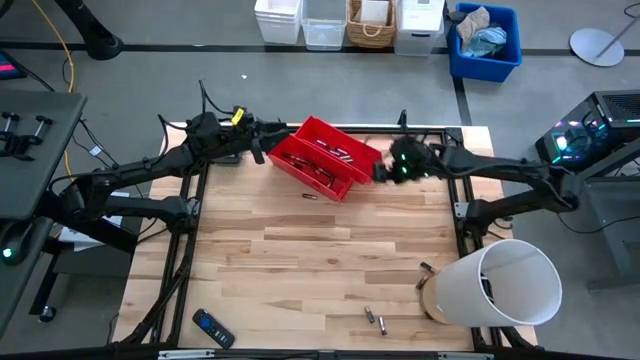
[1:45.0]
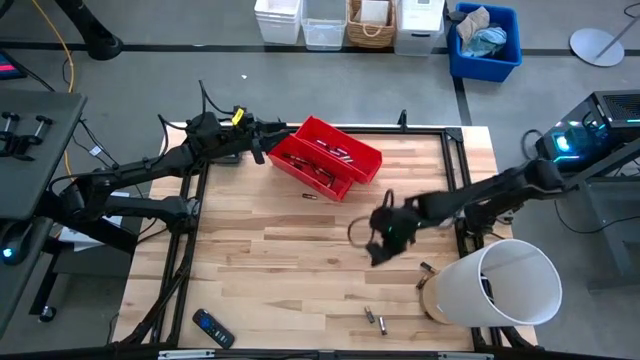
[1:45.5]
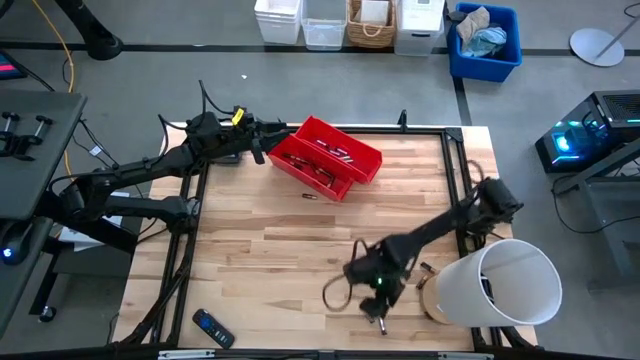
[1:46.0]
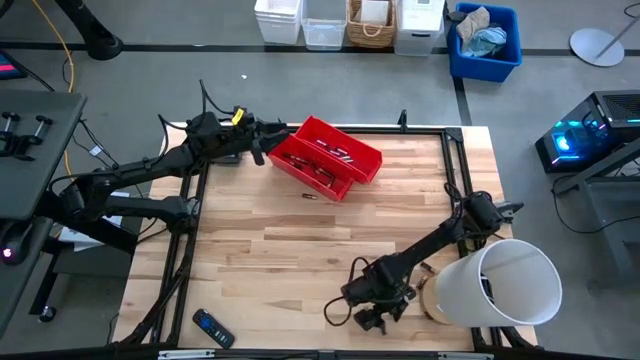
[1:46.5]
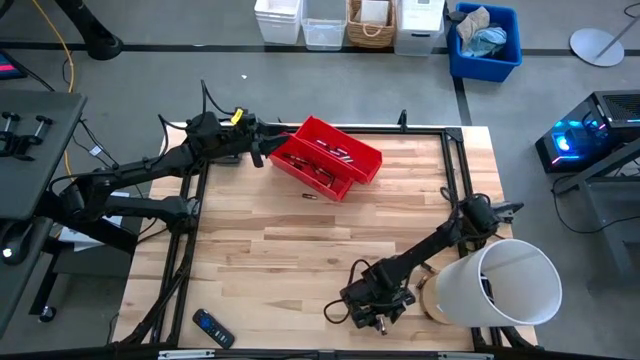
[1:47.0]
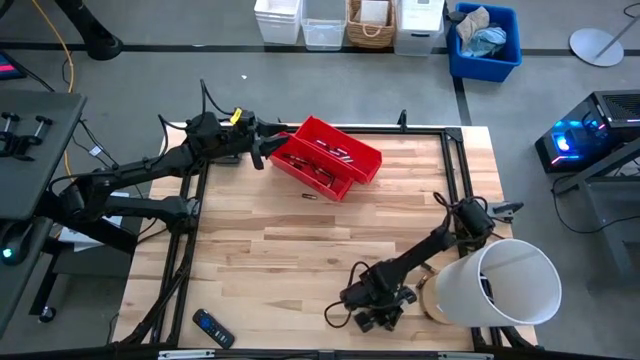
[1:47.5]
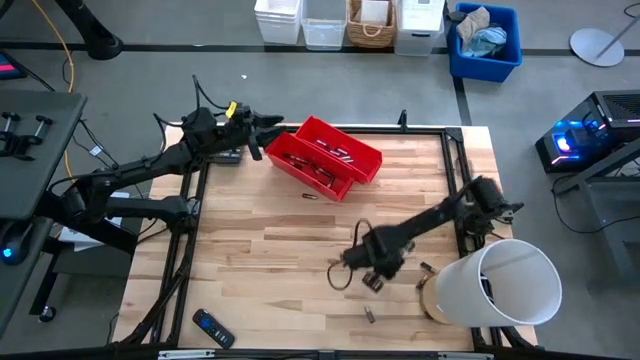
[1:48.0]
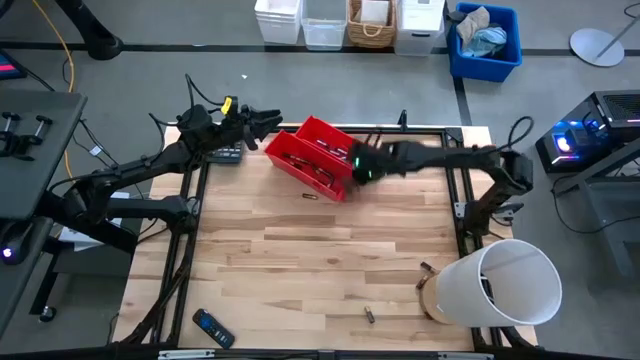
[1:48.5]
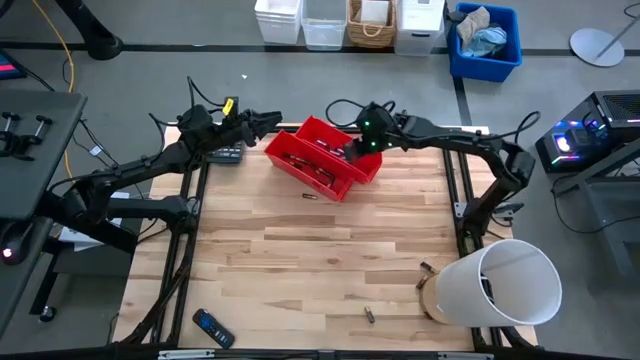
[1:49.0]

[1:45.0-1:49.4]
Task: Sort batteries
Put the silver battery into the top red bin

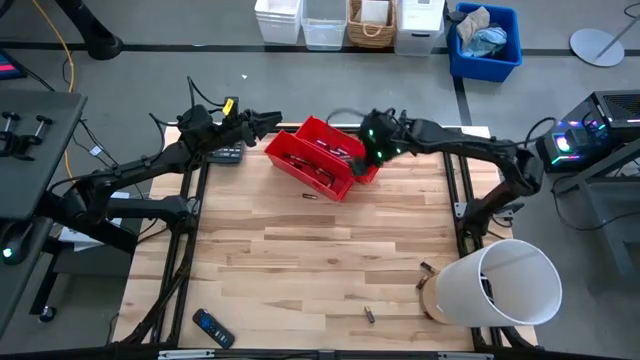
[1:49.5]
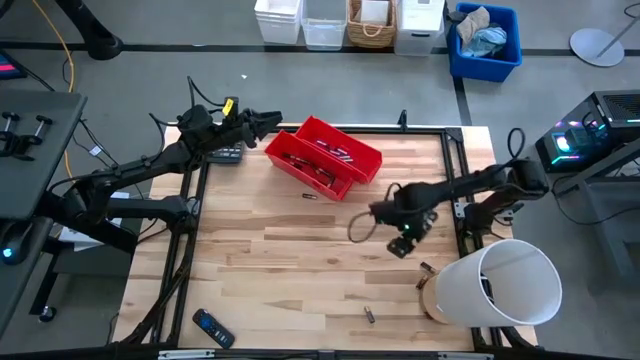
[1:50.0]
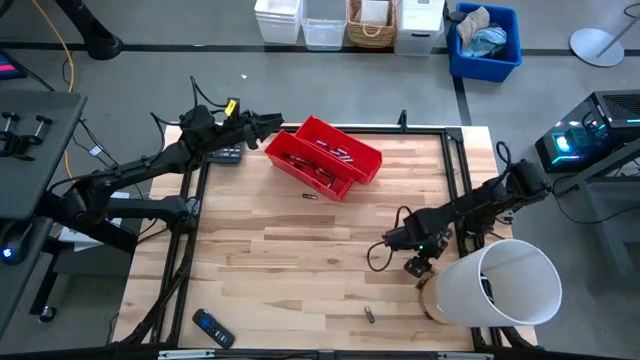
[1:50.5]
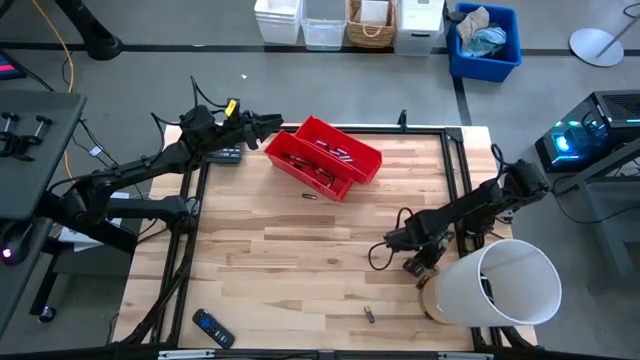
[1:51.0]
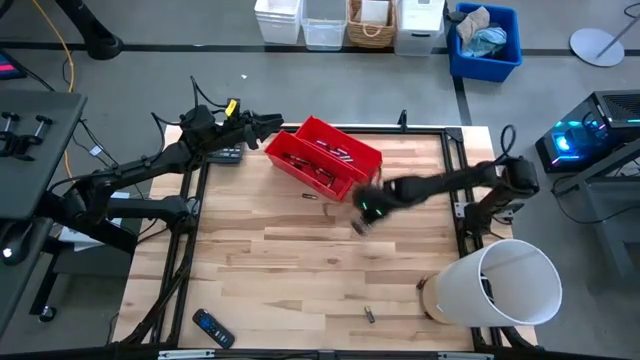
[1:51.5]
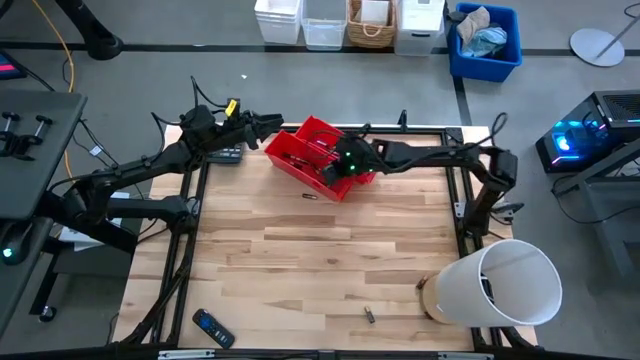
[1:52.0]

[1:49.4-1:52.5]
Put the black battery into the bottom red bin

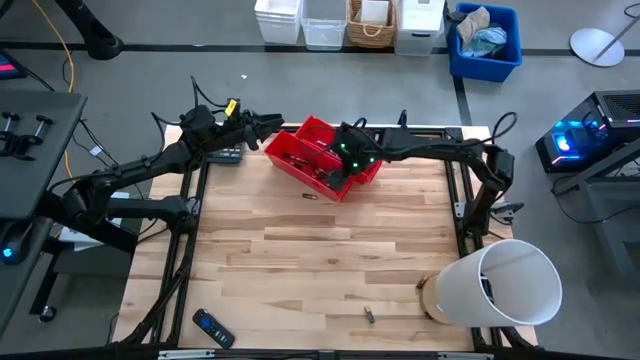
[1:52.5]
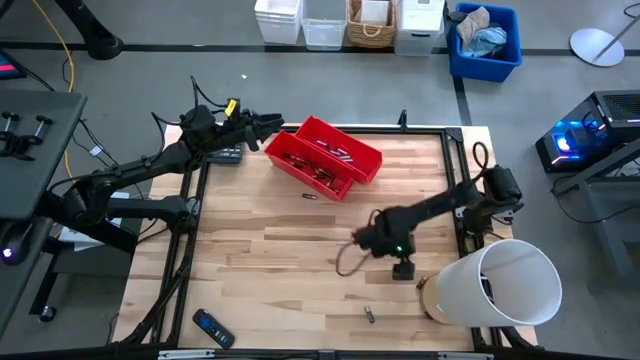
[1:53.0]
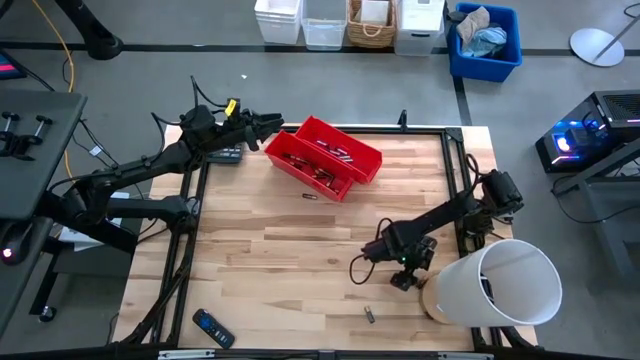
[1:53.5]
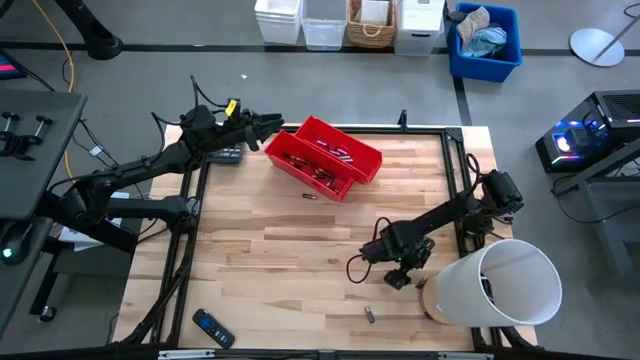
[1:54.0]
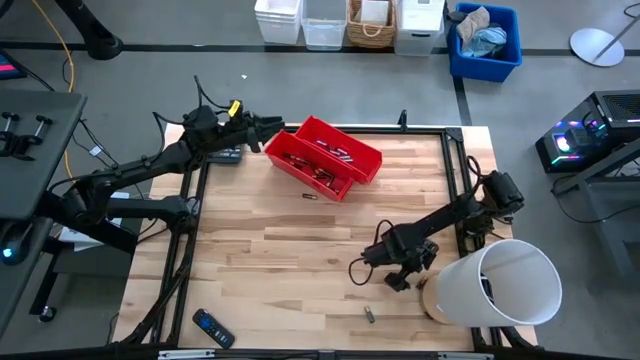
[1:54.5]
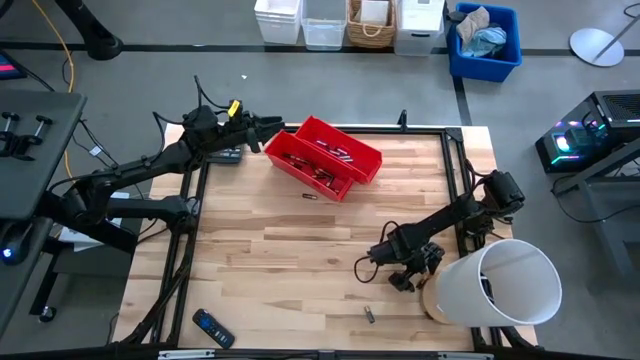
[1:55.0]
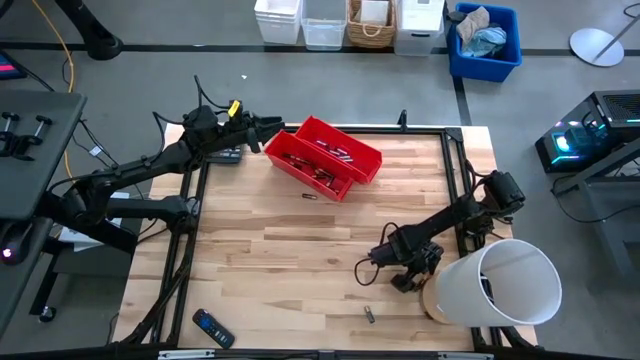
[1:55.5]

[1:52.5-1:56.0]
Put the black battery into the bottom red bin

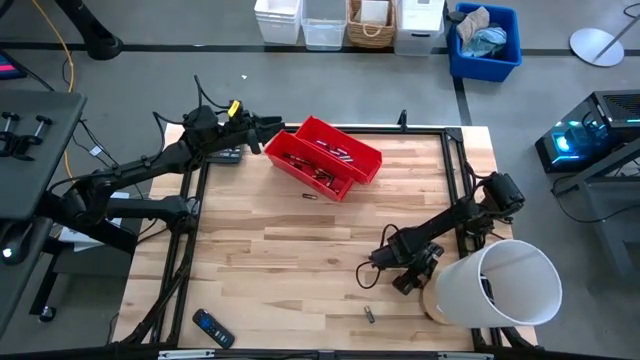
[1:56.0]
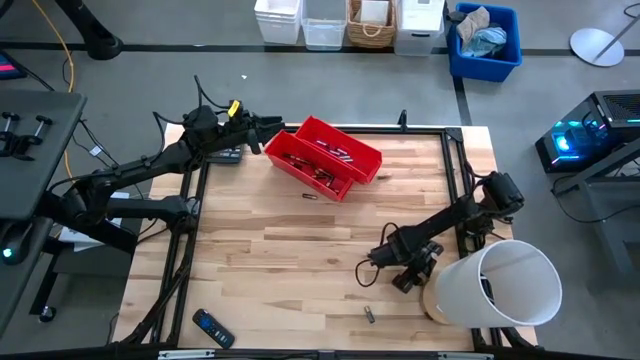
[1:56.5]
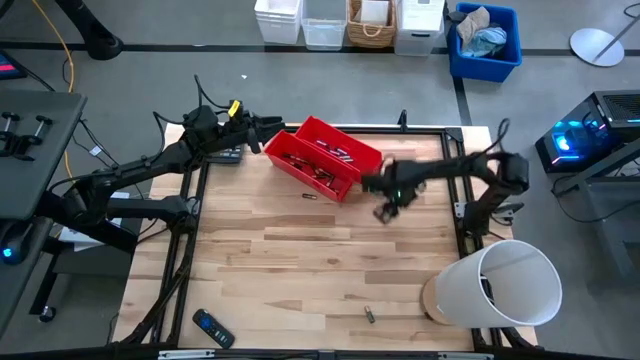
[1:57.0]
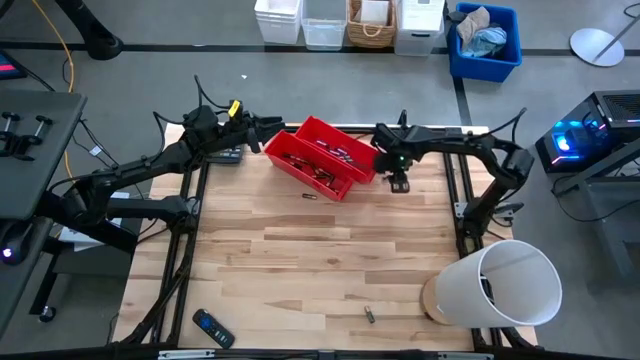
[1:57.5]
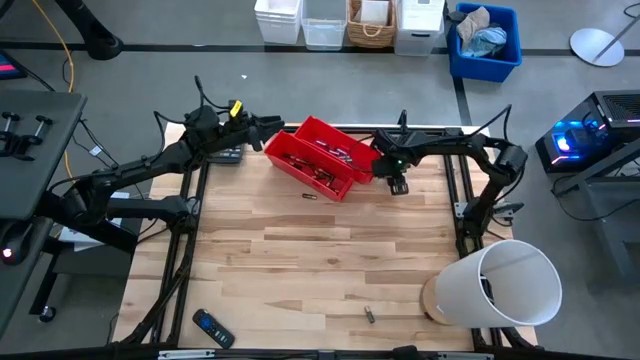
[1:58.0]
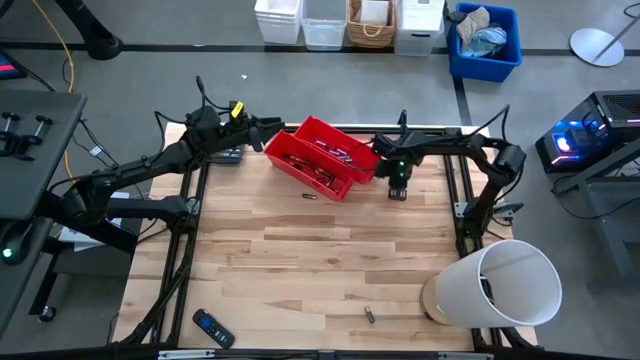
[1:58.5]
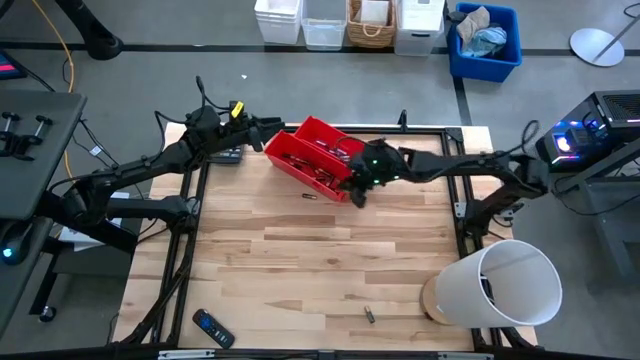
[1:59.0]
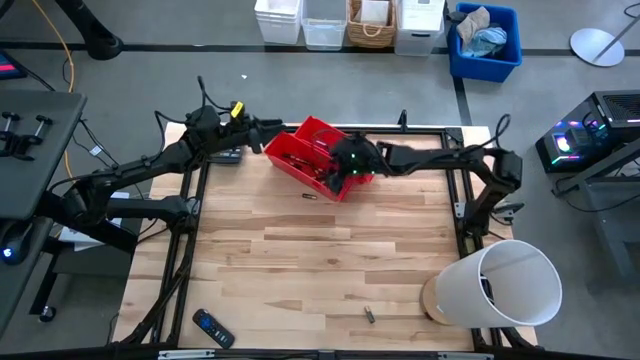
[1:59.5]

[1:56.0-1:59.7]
Put the black battery into the bottom red bin

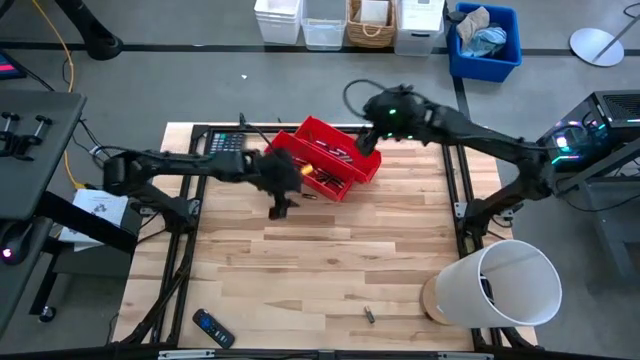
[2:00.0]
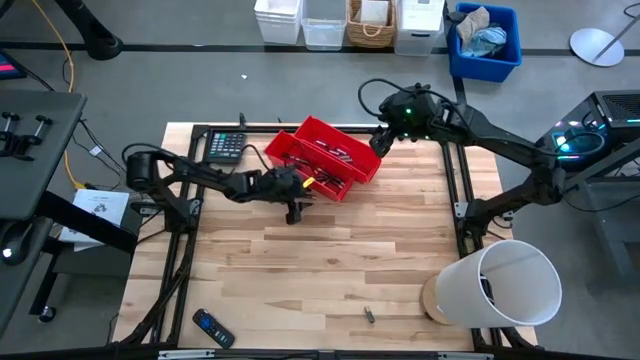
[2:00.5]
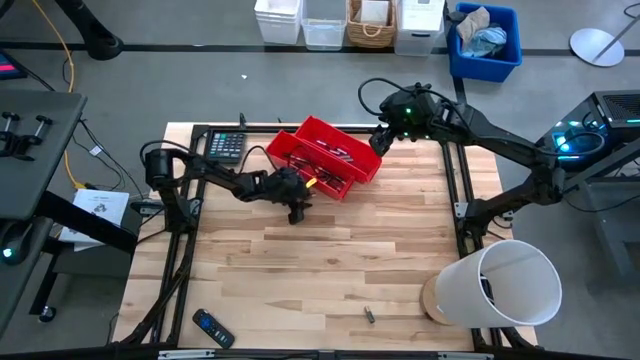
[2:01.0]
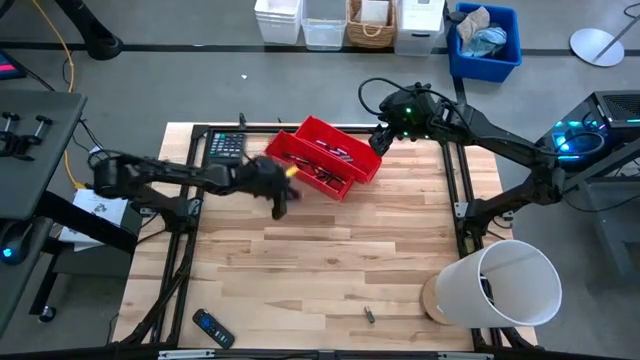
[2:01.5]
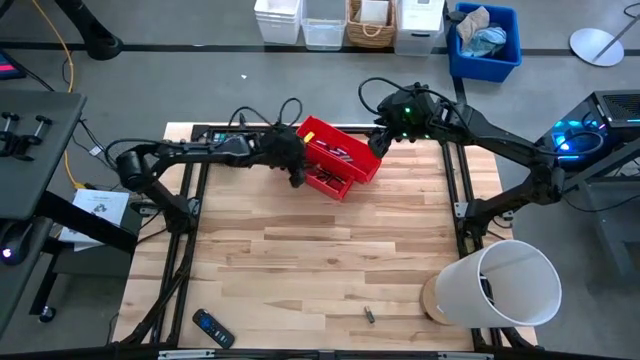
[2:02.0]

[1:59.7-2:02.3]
Put the black battery into the bottom red bin

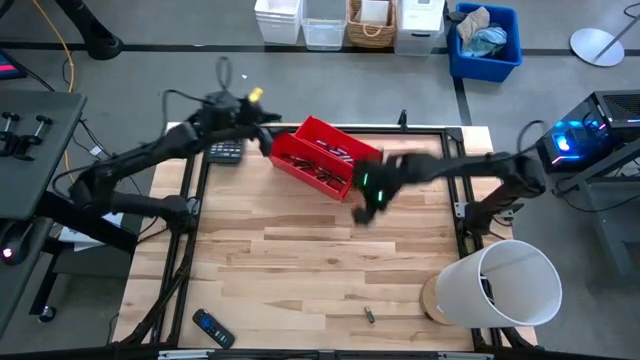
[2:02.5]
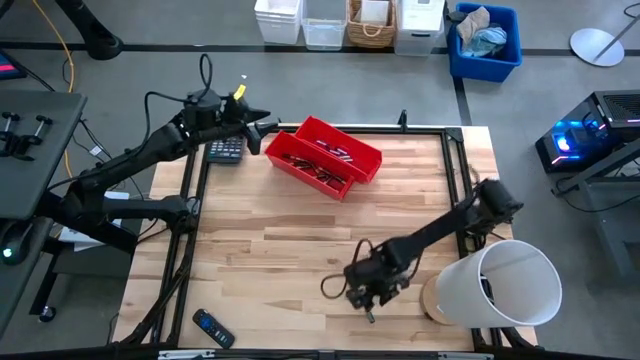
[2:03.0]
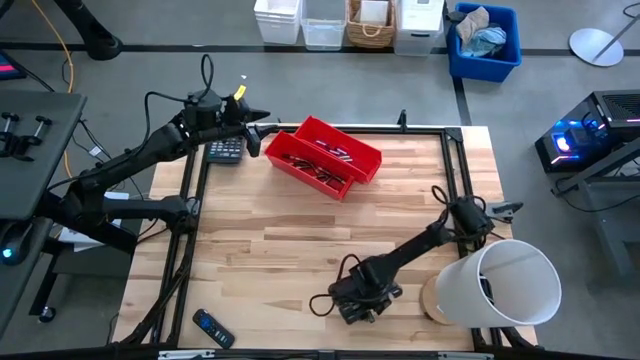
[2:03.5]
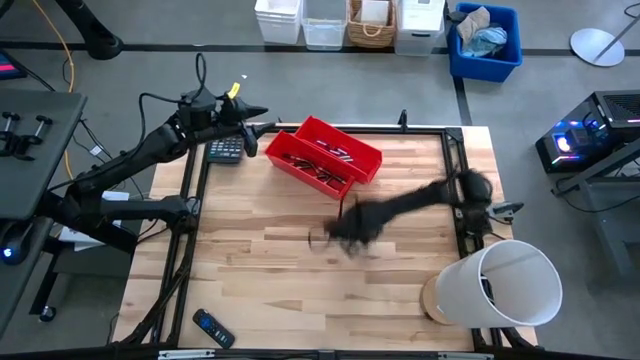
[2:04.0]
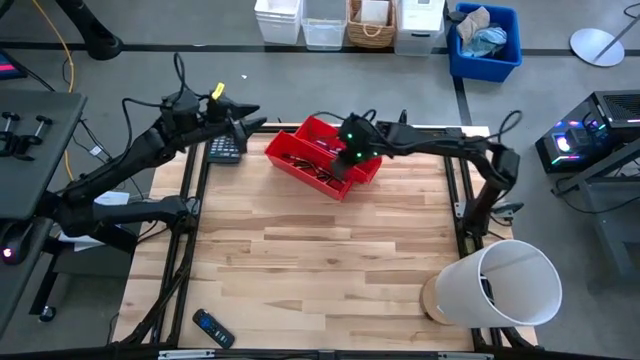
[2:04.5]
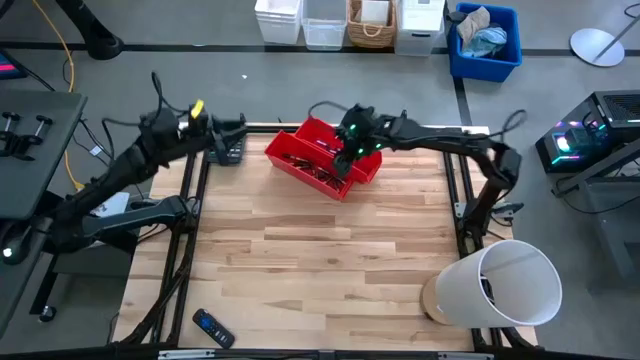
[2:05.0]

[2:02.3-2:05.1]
Put the black battery into the bottom red bin
